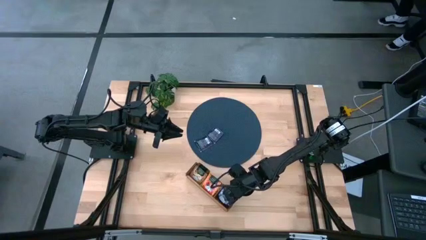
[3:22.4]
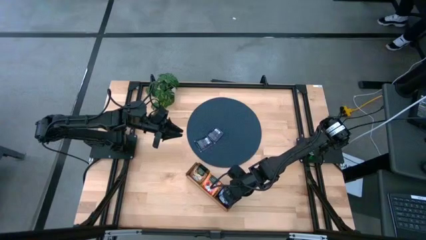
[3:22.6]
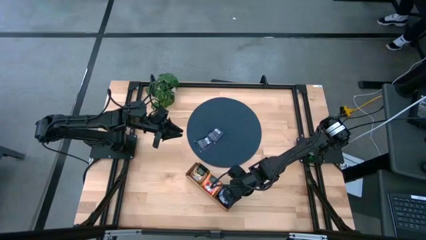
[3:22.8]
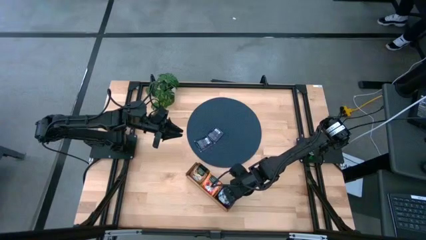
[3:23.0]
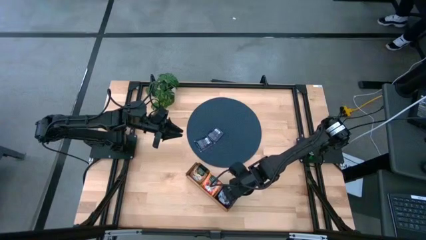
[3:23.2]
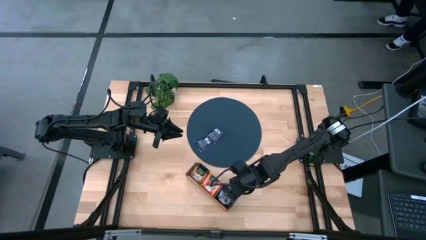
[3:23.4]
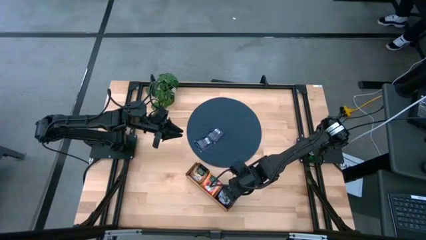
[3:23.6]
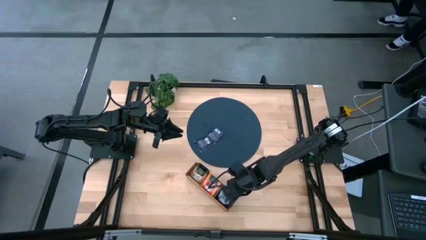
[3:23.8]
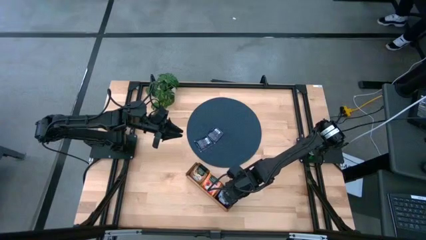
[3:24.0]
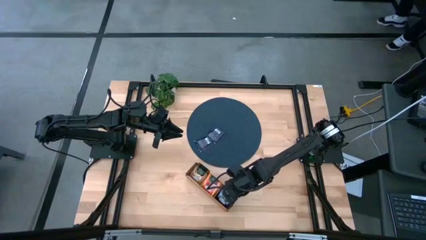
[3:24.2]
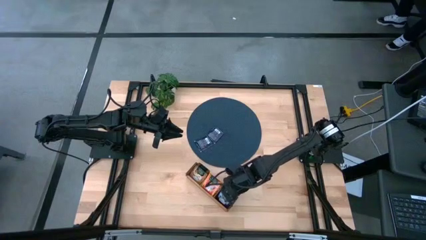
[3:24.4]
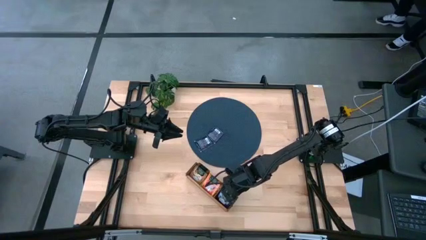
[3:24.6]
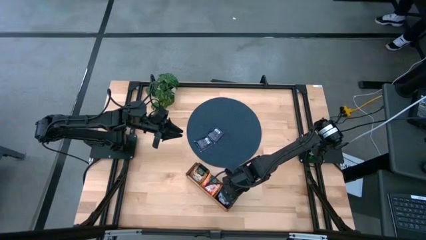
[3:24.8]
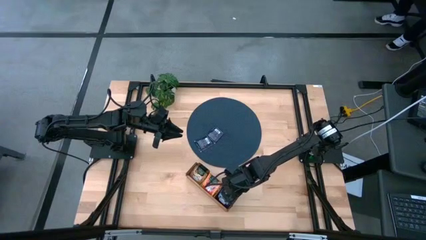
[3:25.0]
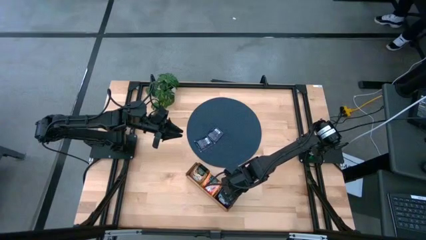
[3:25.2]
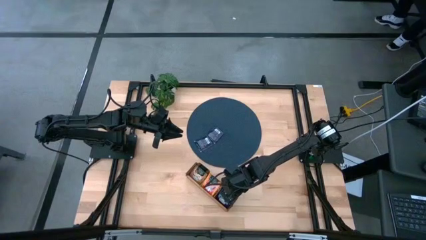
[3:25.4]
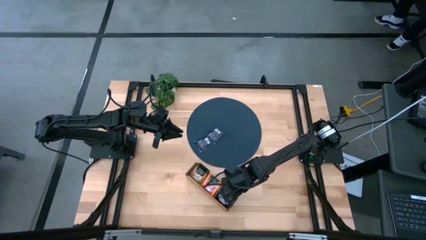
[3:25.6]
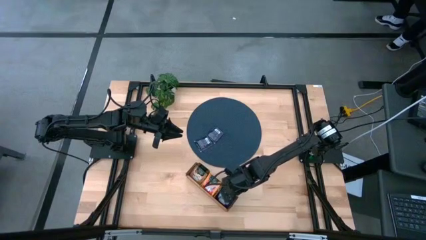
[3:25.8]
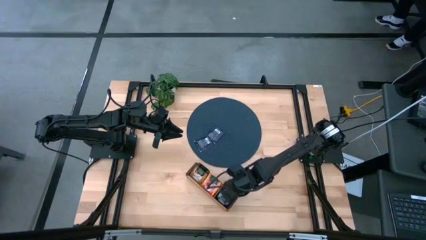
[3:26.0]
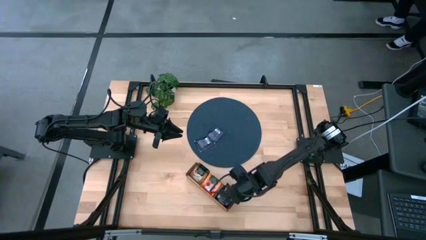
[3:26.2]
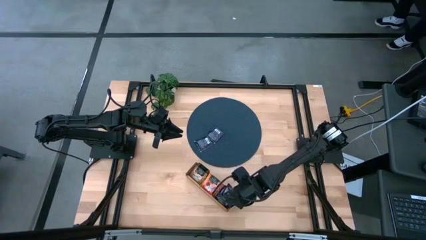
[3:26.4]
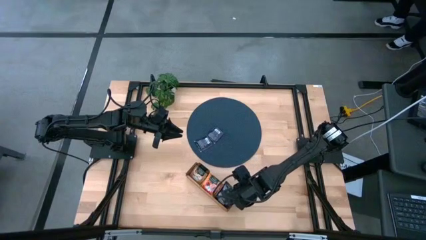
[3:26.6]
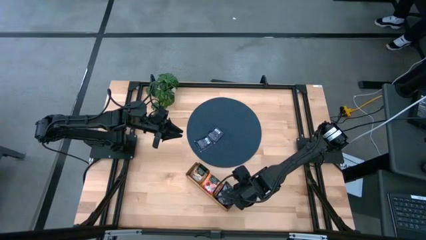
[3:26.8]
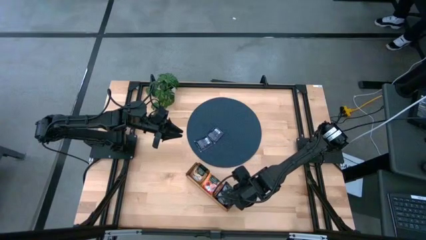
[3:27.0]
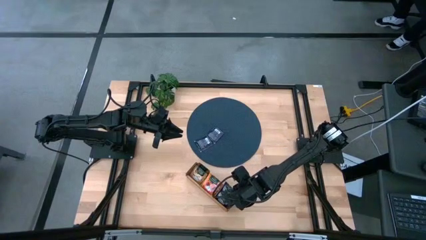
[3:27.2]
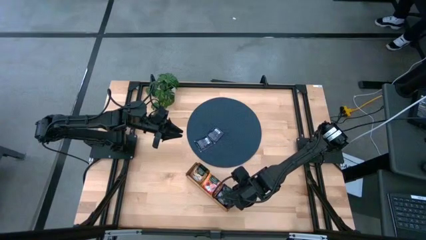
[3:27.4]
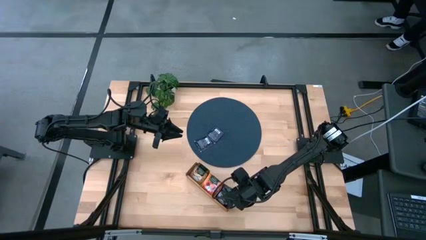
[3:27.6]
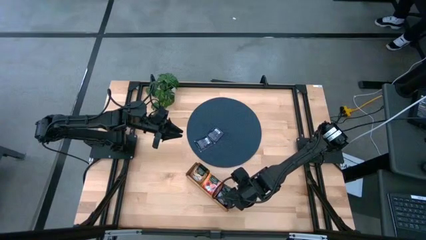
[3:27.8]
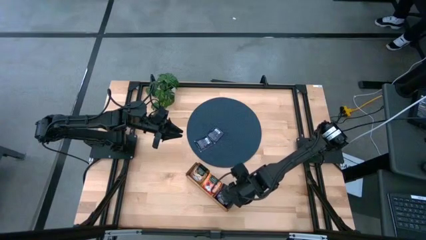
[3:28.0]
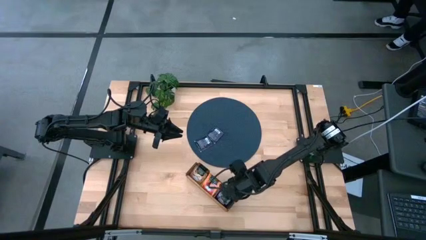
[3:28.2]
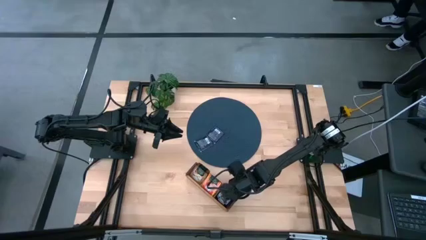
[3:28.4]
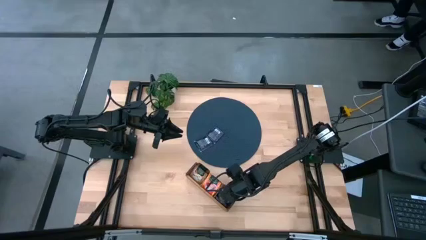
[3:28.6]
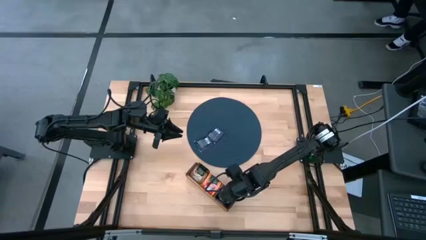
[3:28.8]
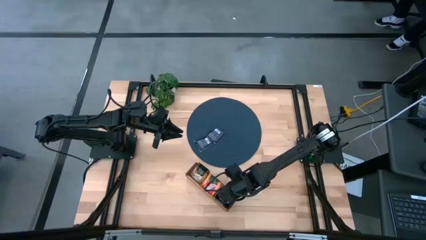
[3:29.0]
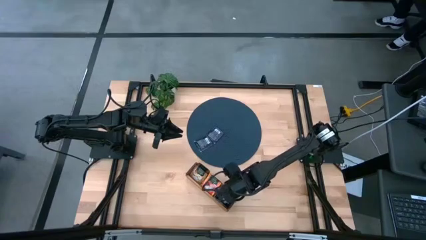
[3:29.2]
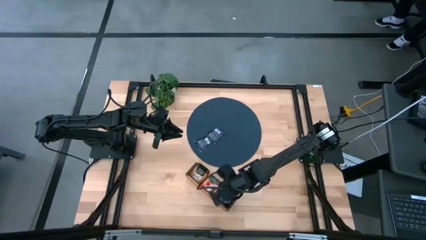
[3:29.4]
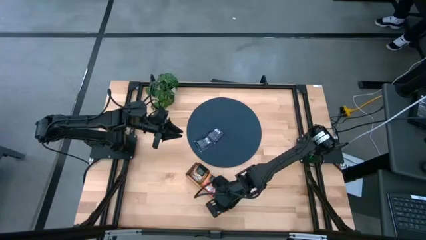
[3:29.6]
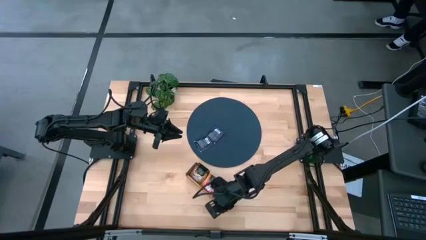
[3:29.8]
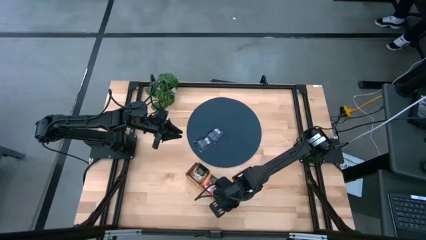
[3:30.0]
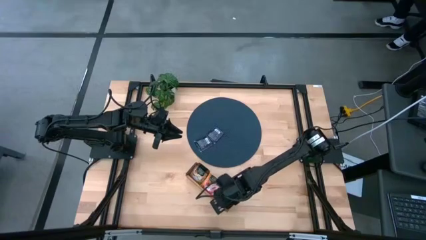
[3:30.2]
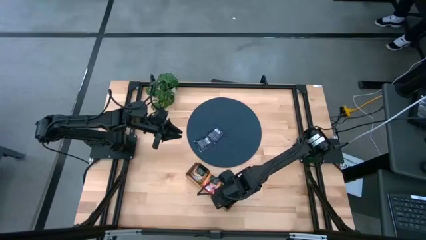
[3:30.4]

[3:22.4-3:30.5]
Task: Pick & Place Tea
Adjust the violet tea bags inside the right section of the wooden organizer

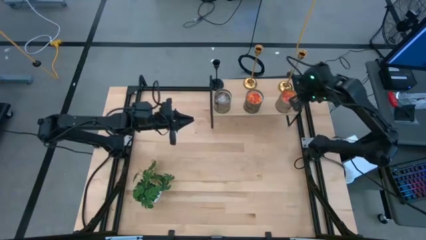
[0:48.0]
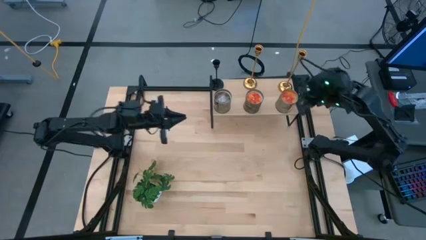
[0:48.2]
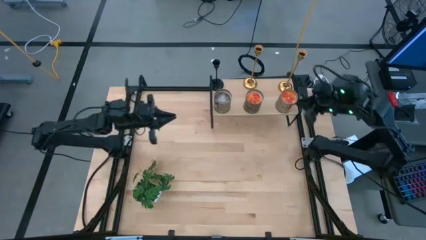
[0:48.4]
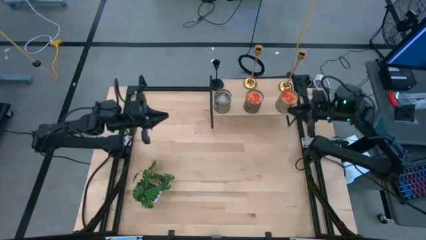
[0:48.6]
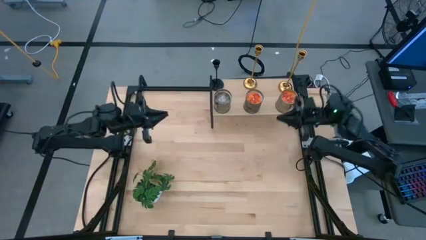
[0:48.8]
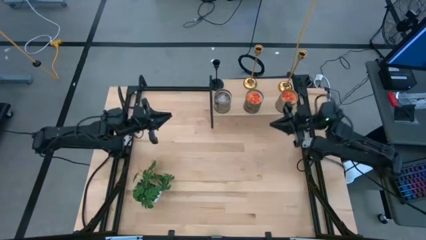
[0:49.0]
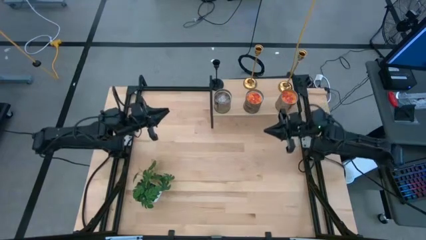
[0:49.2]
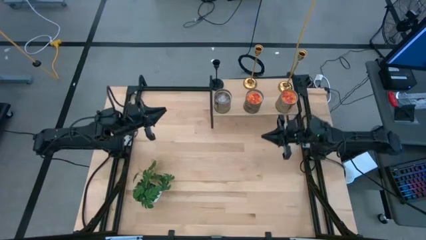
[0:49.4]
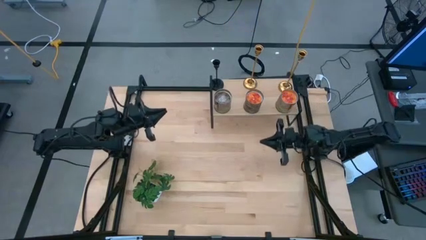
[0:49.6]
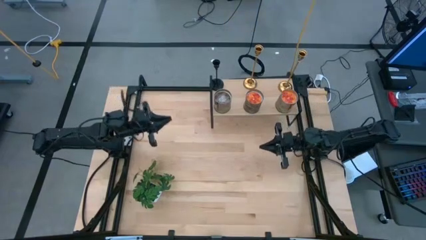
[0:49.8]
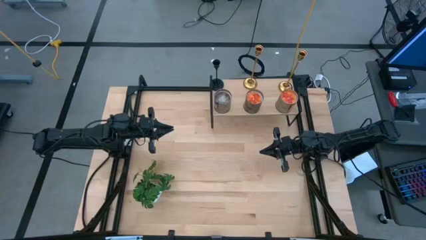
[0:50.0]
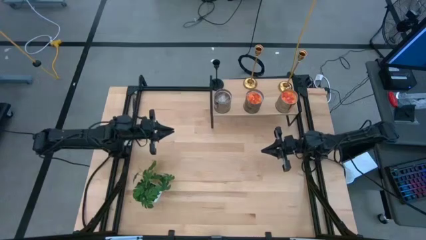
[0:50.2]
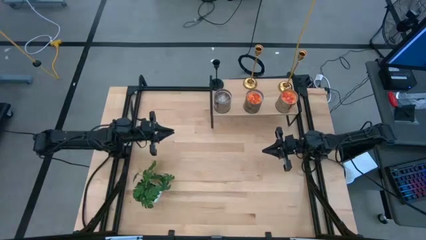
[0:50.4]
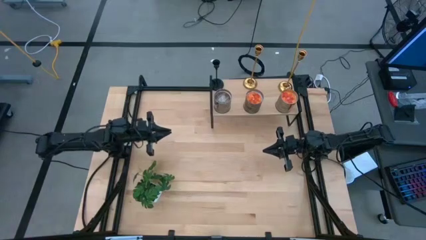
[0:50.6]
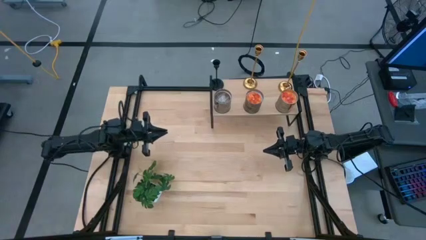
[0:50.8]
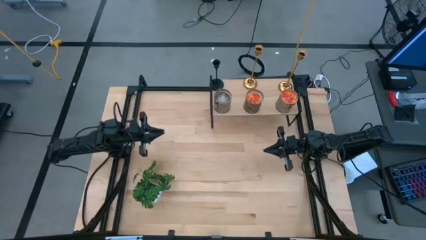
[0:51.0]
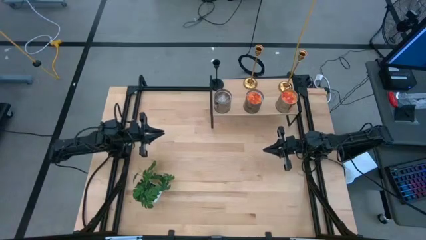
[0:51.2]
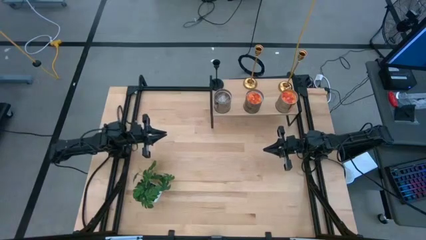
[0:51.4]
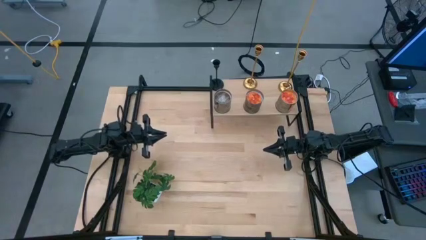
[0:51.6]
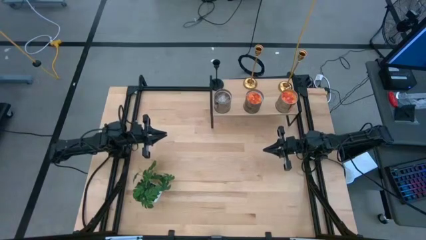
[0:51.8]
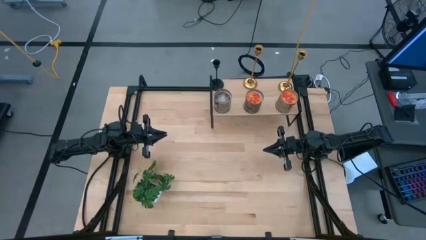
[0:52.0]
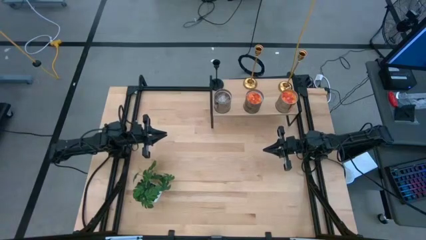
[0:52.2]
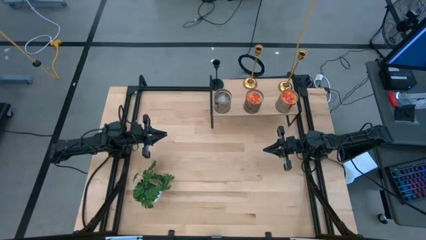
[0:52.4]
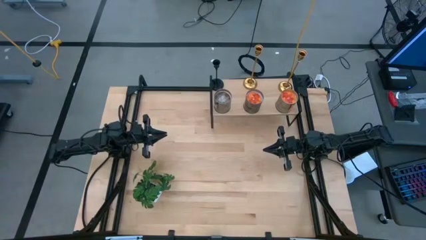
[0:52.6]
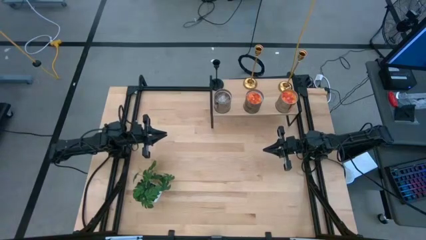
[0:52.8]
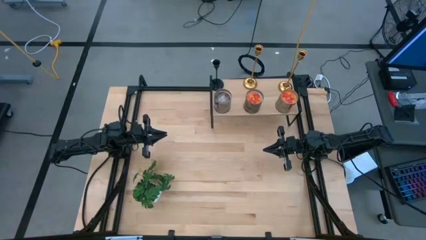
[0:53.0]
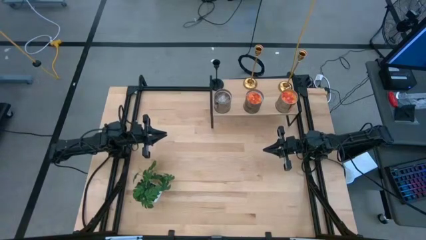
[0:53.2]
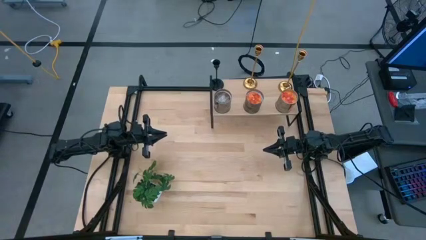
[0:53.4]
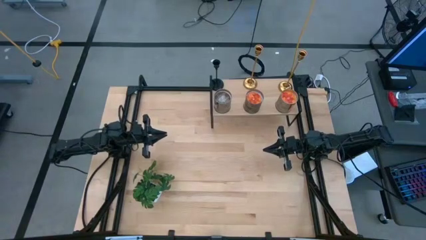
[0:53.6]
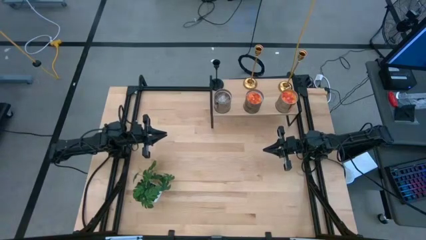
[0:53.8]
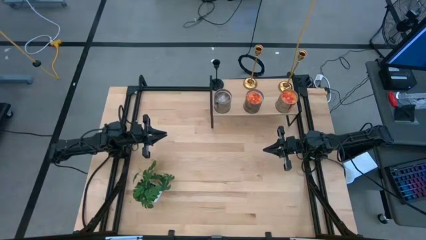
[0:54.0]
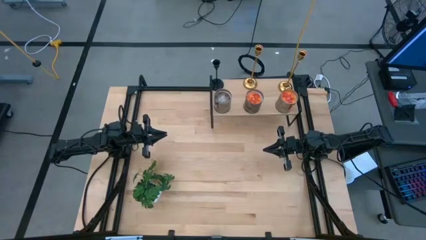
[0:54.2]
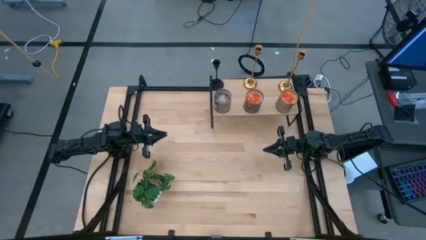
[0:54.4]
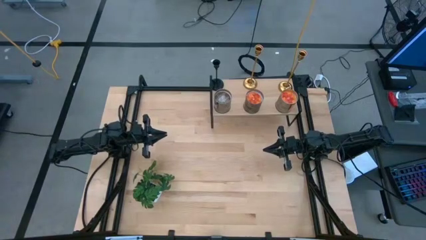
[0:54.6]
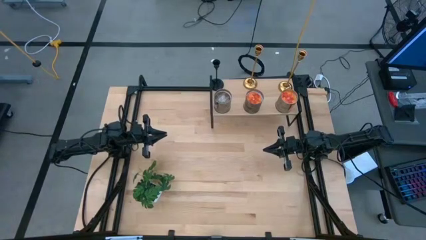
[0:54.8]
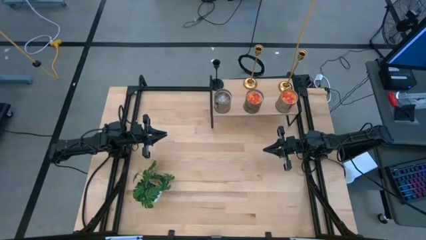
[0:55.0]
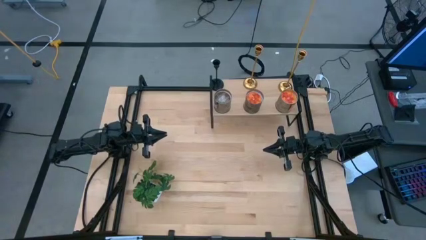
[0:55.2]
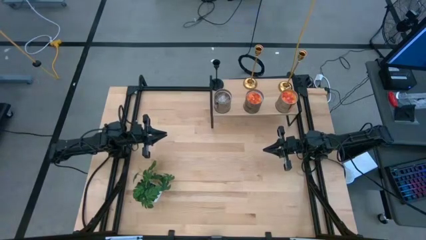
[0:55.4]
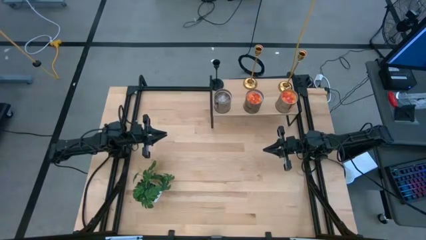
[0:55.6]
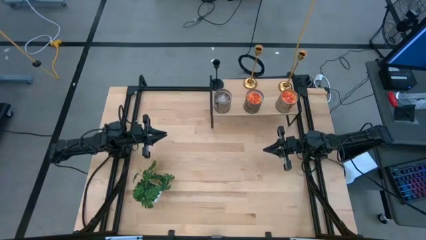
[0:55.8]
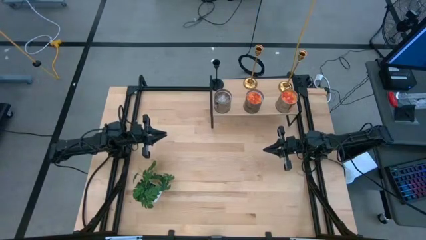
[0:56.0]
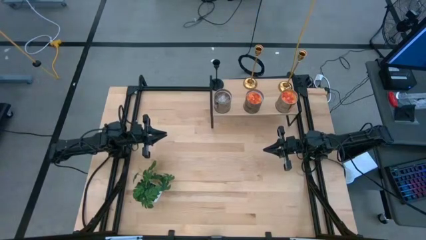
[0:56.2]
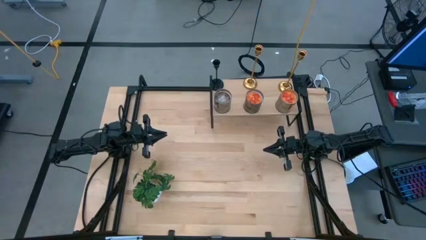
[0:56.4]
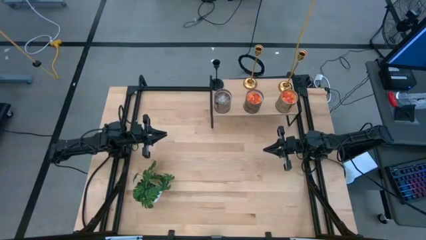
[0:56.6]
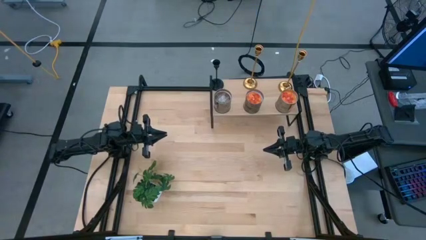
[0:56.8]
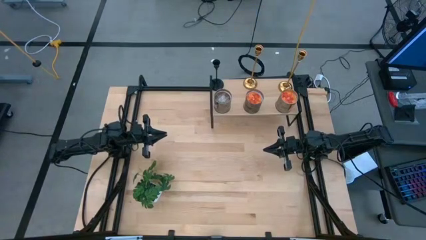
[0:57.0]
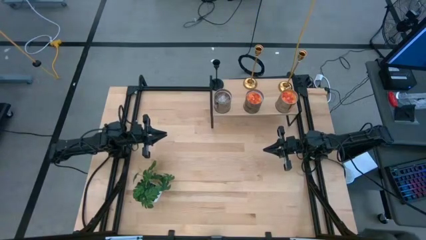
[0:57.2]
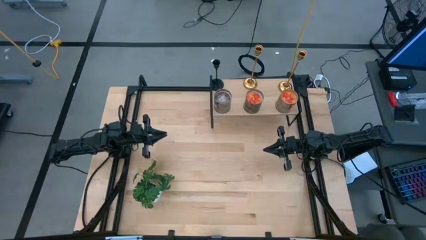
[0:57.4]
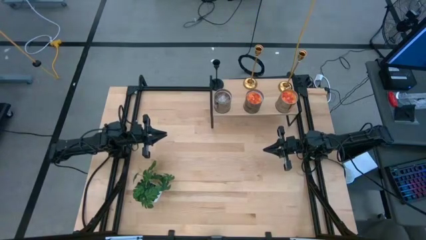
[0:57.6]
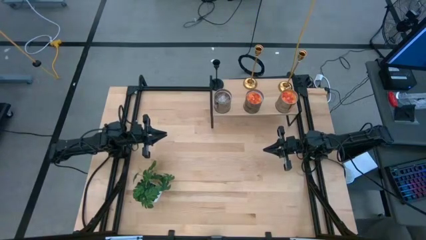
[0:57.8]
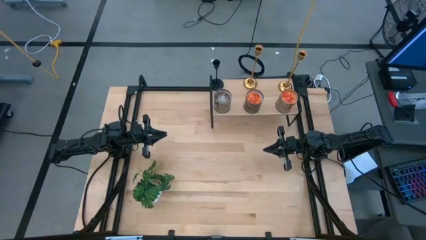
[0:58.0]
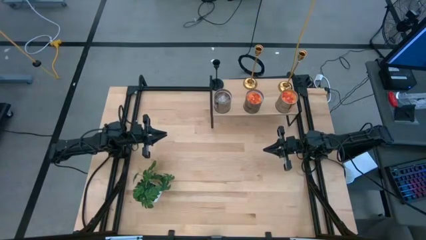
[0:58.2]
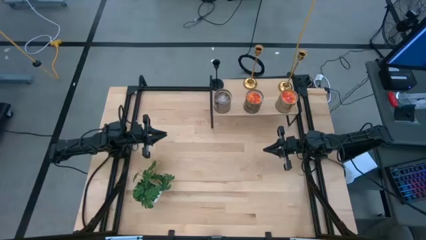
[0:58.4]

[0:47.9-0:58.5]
Task: Pick & Place candle stick holders
Return to Home Position
